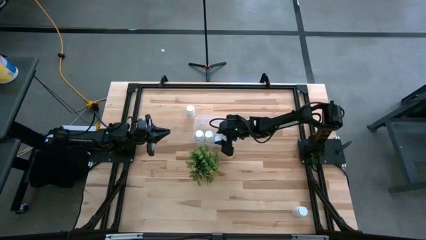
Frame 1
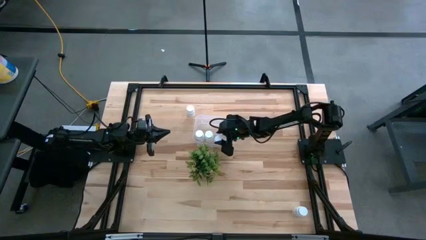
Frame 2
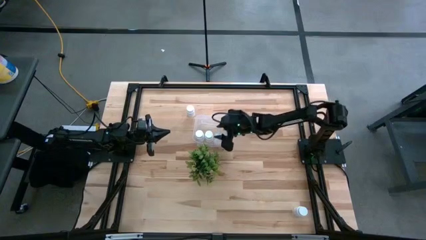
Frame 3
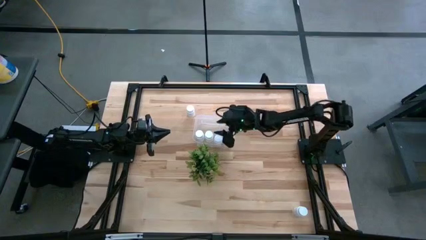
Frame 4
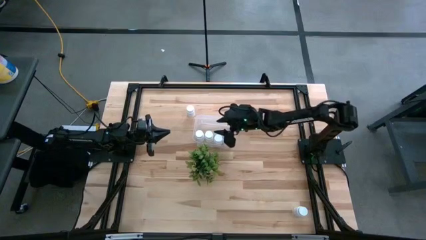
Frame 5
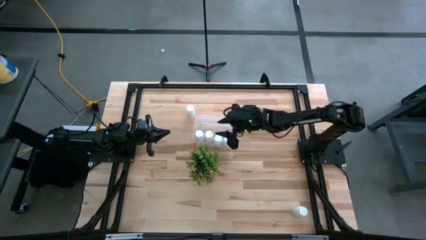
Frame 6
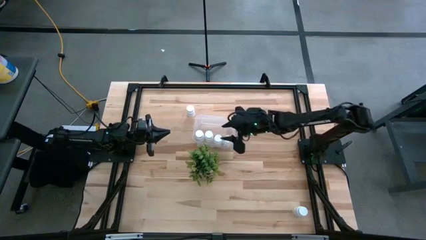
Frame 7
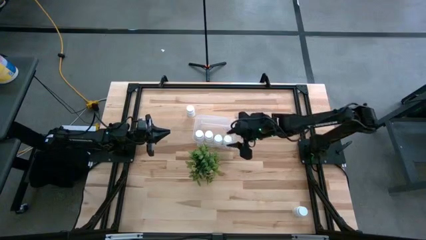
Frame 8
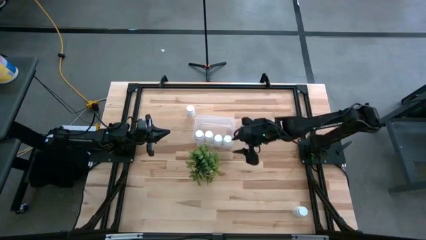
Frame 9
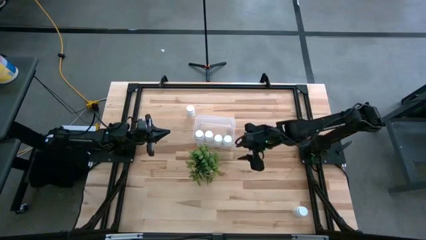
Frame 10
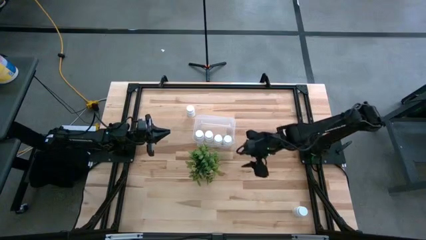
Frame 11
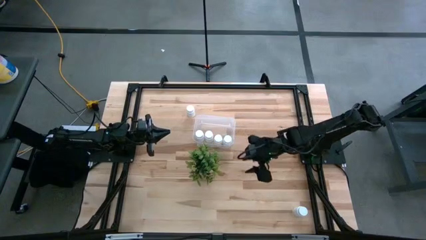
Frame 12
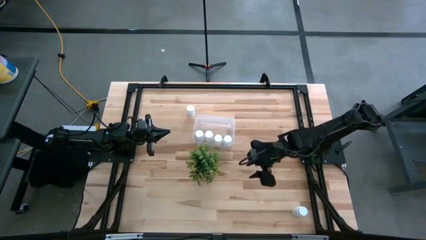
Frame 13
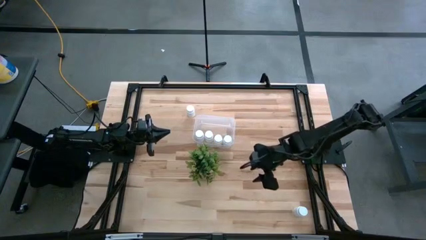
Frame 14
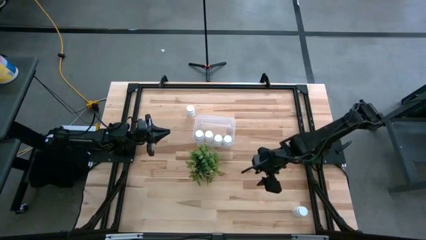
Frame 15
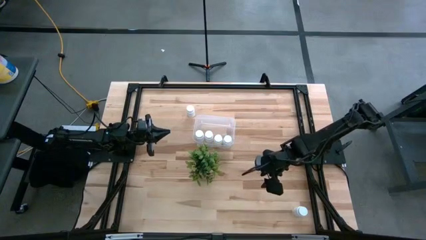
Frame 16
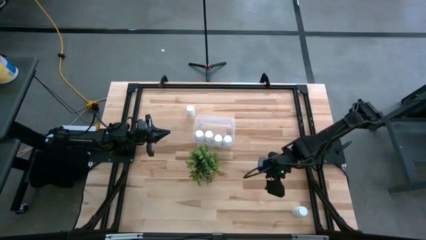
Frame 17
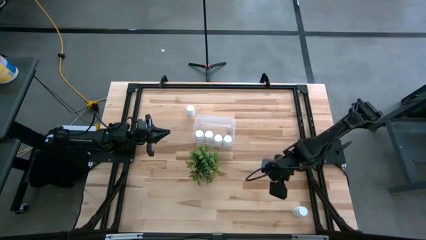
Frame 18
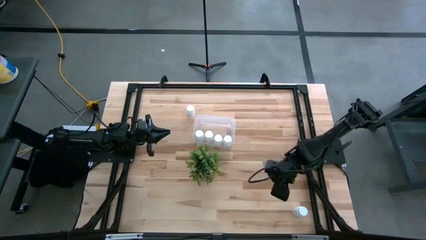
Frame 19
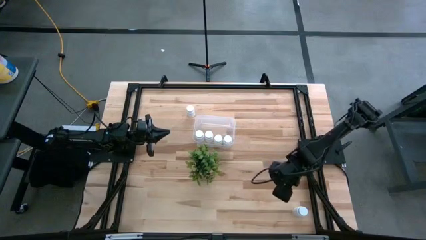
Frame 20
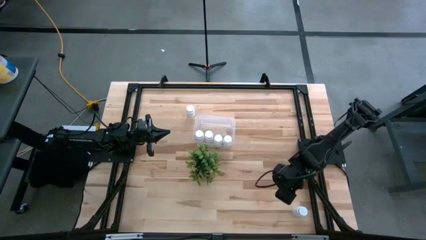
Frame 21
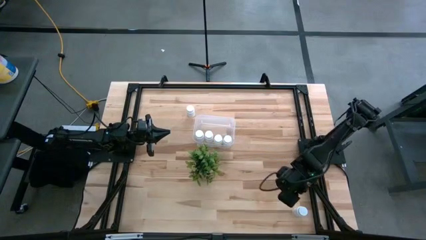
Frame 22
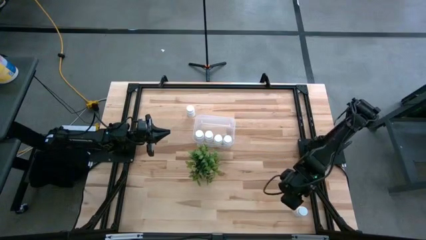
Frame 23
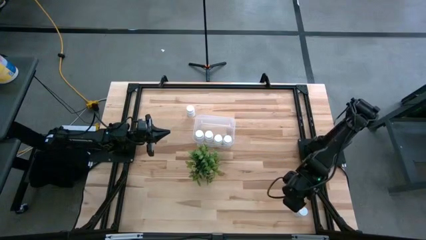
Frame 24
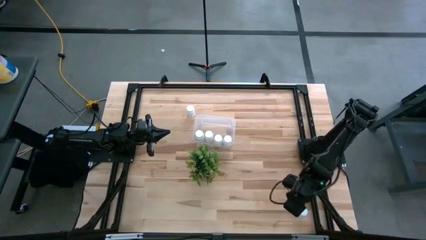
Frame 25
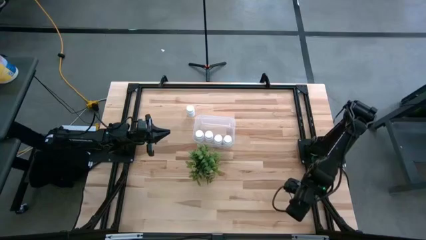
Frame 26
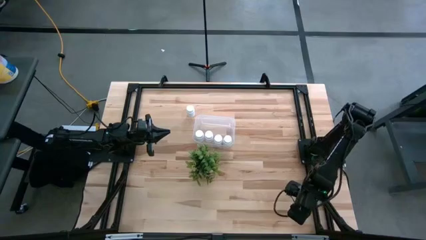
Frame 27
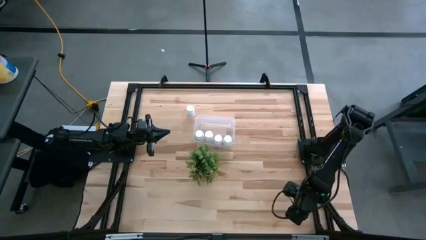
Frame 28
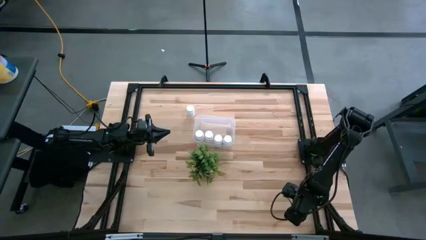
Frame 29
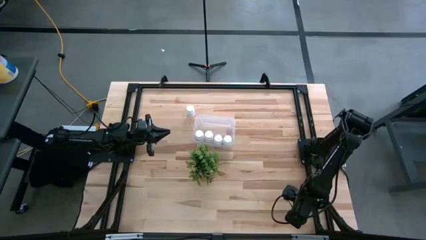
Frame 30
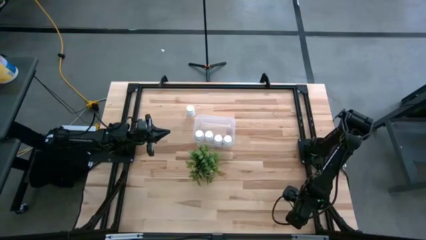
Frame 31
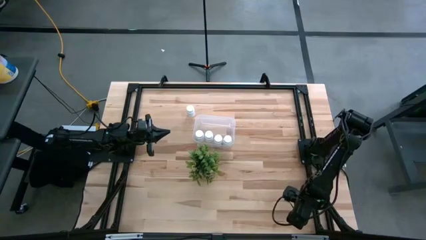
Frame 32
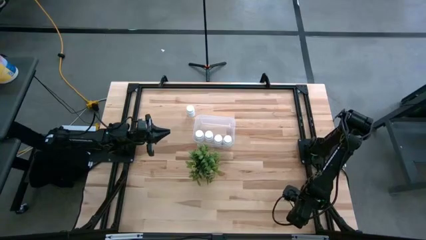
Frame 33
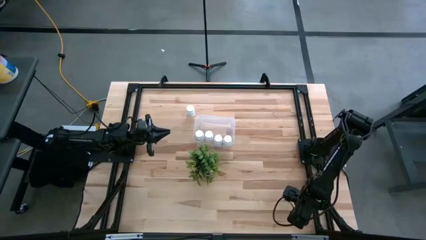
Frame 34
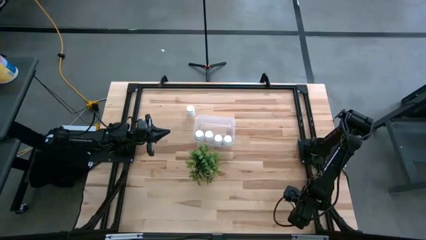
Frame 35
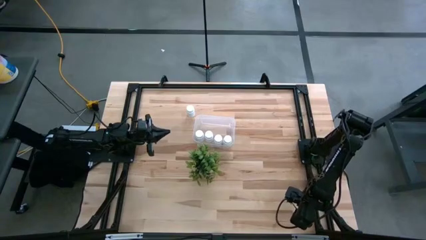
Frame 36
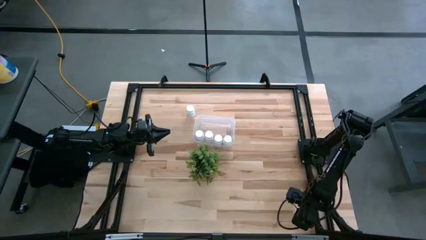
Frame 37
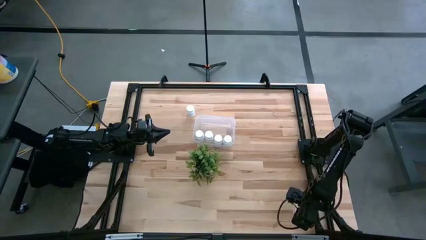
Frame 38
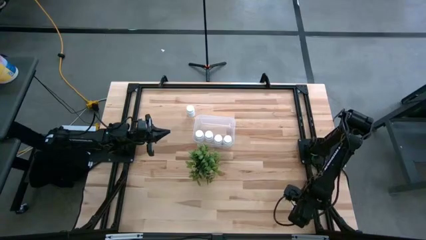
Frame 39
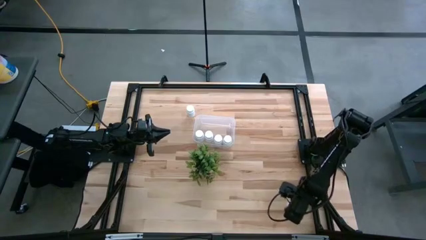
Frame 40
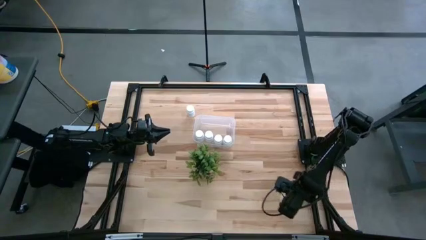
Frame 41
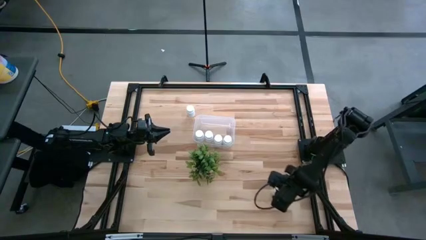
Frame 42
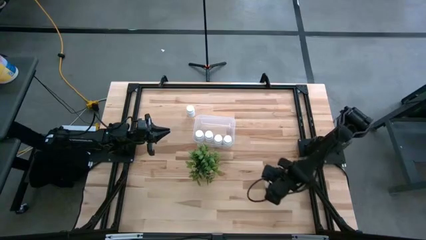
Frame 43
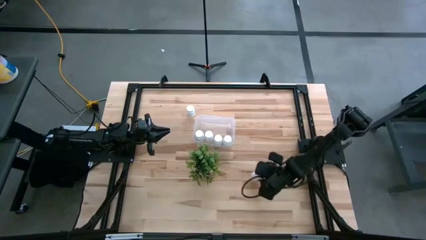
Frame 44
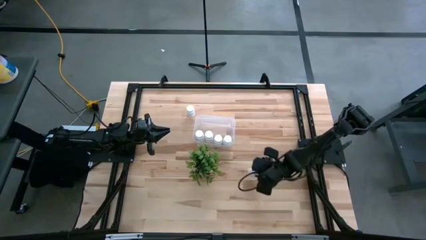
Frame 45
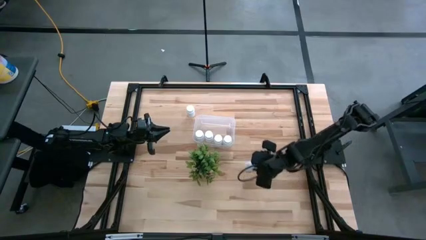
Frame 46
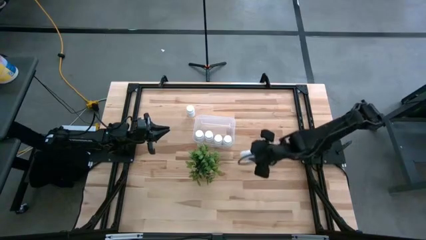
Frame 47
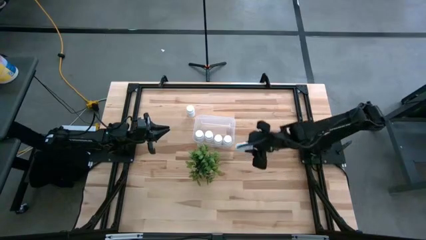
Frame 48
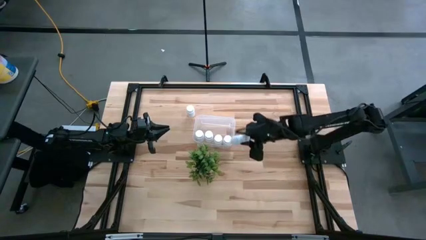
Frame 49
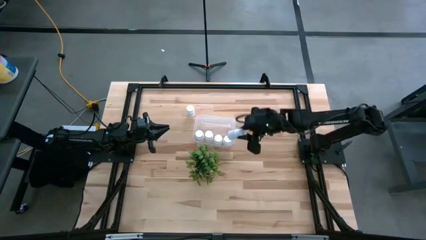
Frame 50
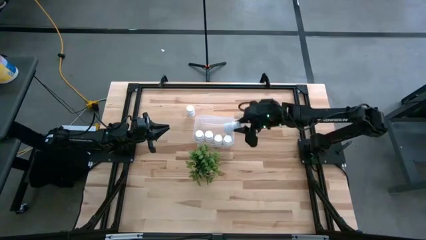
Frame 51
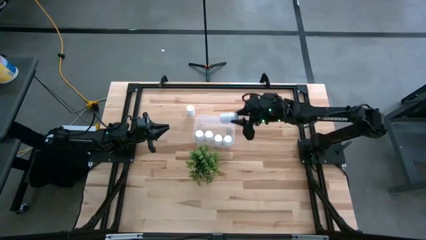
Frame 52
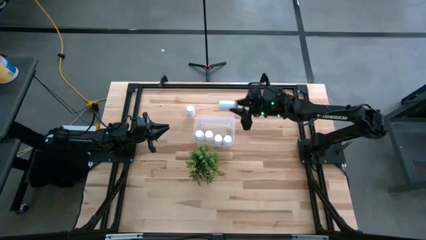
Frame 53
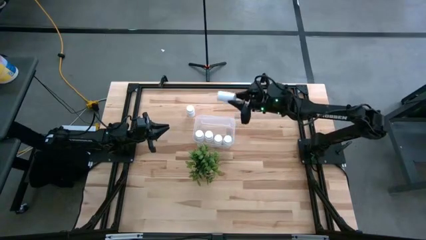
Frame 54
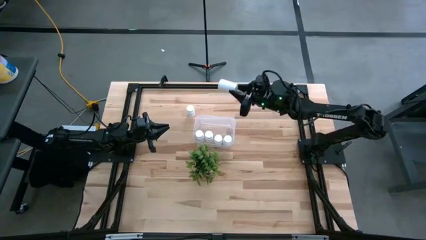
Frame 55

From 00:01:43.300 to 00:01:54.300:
Task: Pick and place pill bottles into a basket
Put the white pill bottle in the transparent bin
